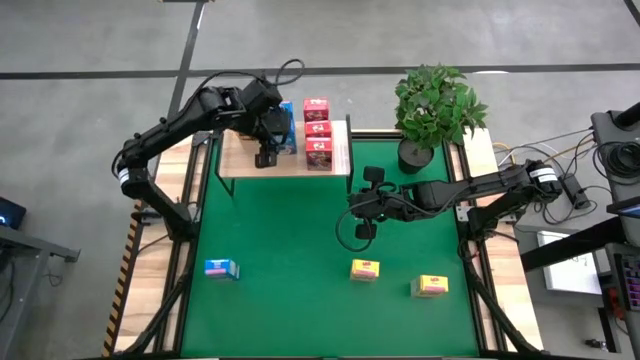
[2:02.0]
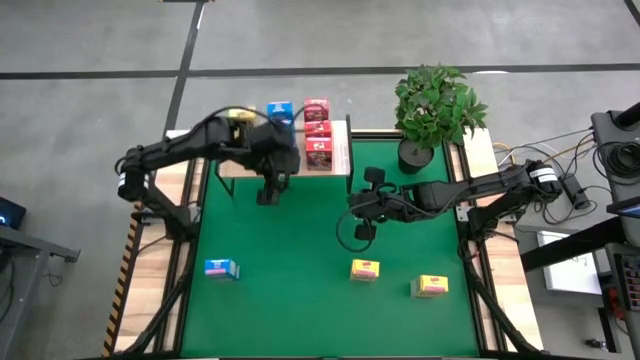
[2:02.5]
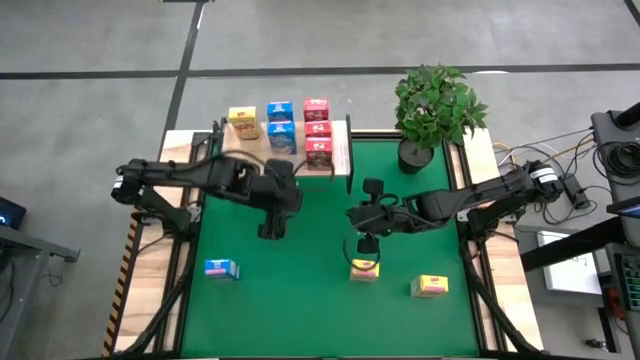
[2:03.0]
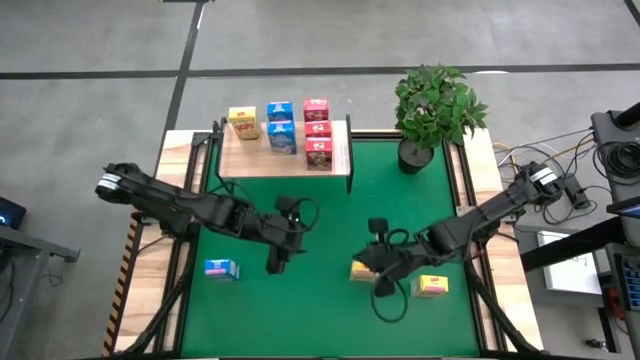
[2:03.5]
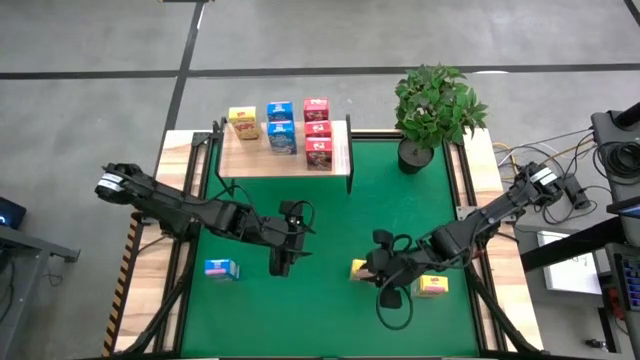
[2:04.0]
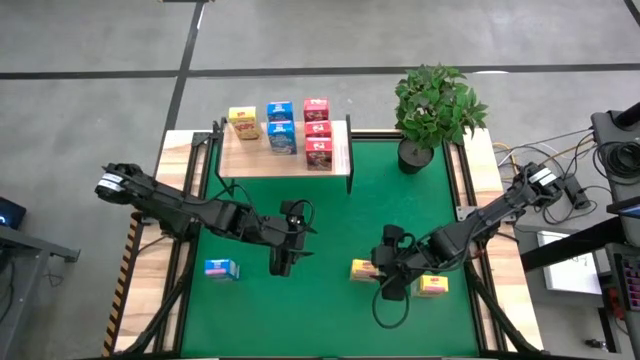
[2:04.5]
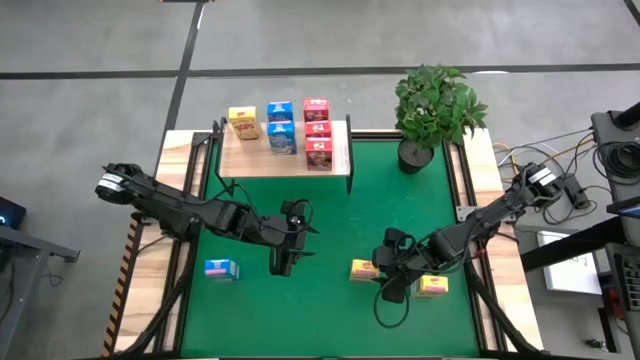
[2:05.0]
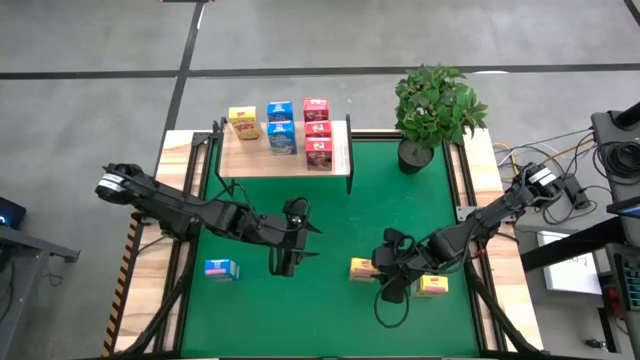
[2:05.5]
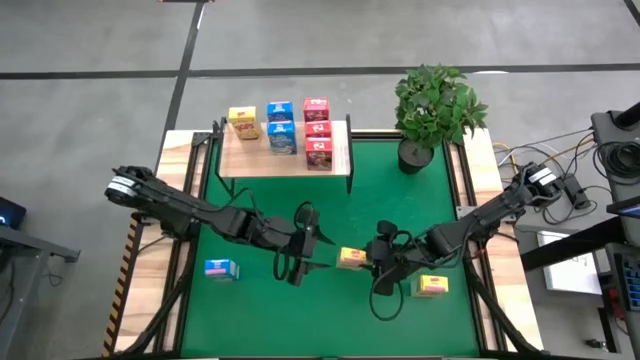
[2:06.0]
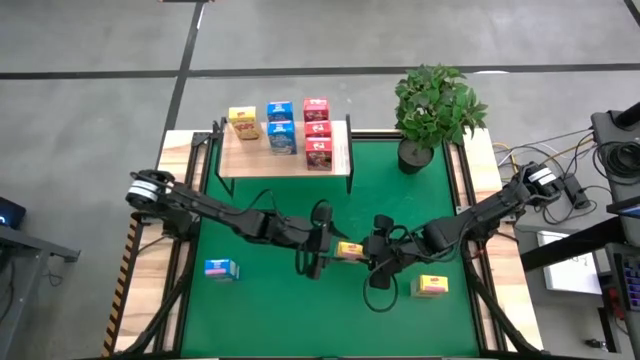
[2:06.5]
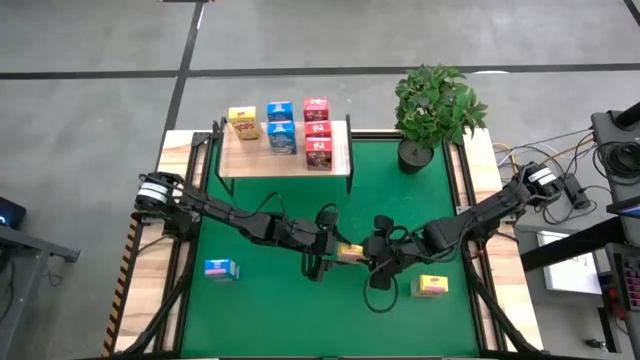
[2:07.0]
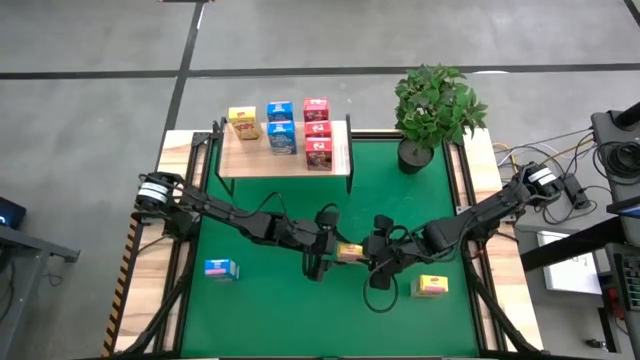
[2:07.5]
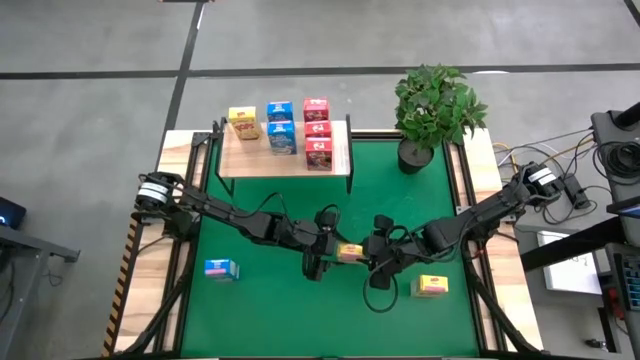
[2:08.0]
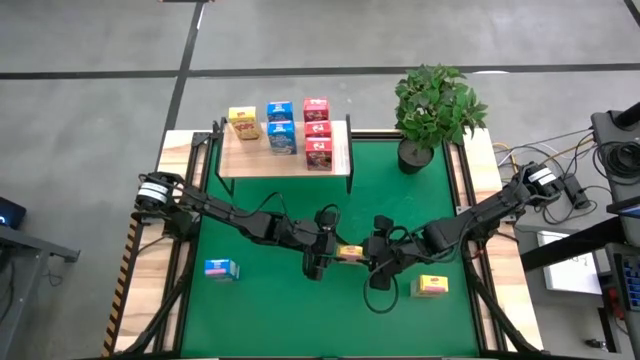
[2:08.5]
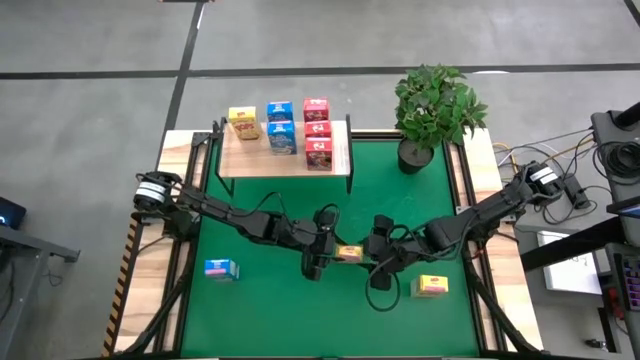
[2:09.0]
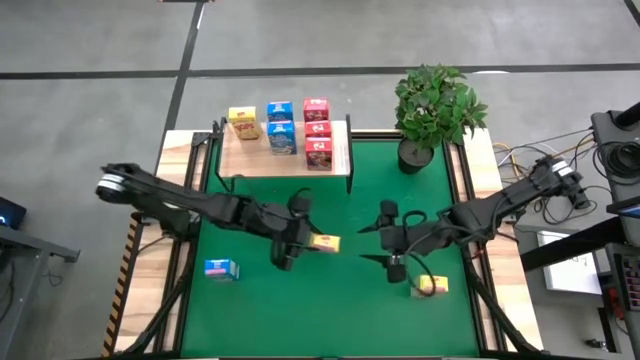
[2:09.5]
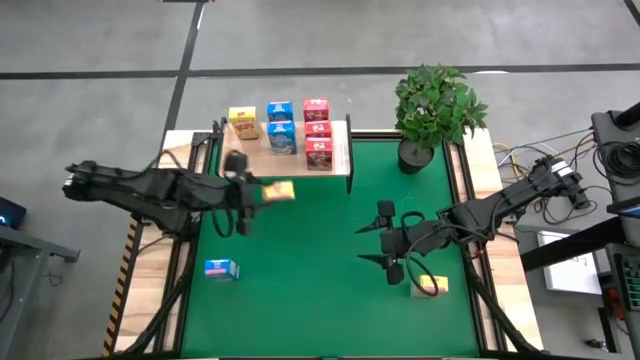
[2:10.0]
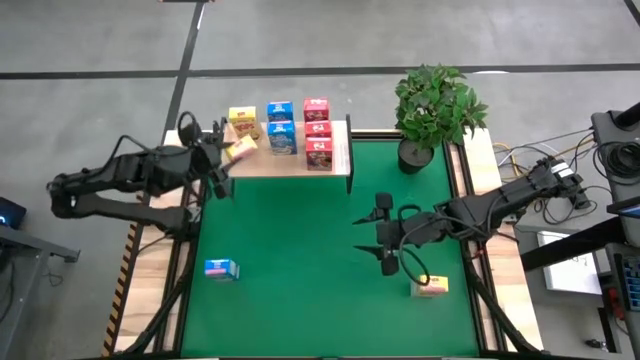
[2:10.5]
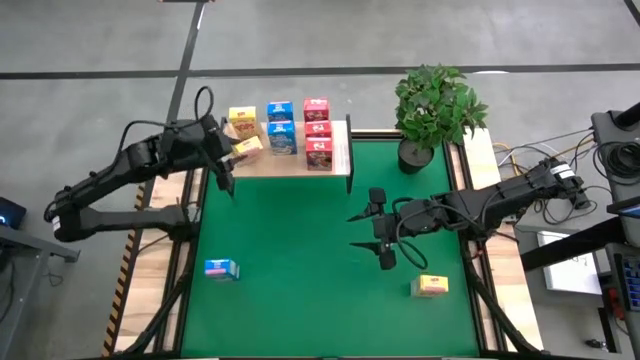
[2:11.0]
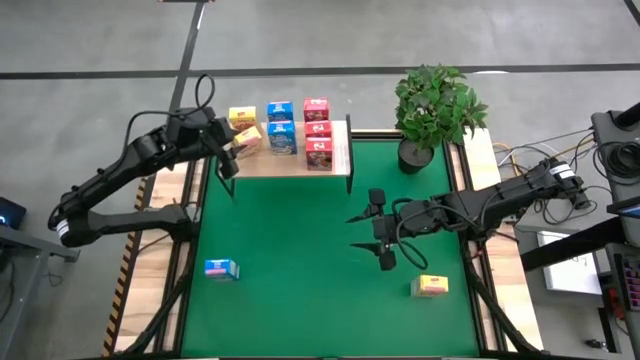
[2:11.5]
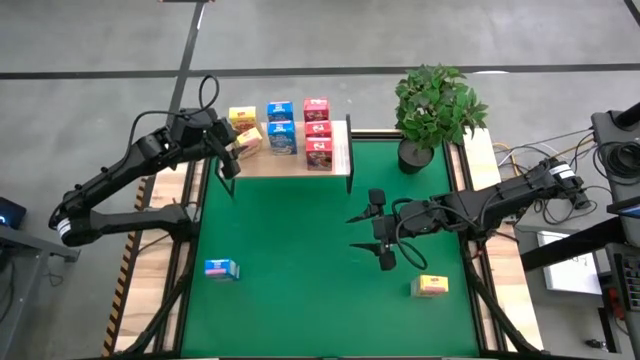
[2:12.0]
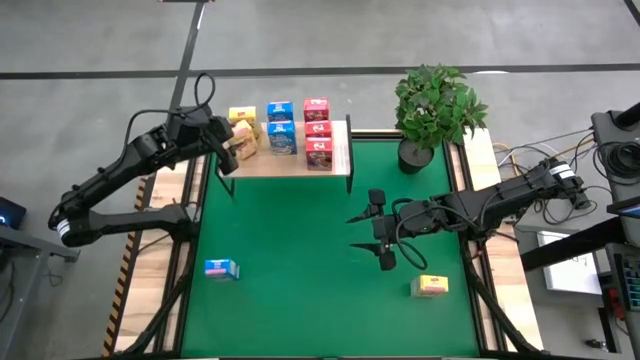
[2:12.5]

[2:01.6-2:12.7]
Task: Stack cereal on shelf
Put the center yellow cereal on the shelf

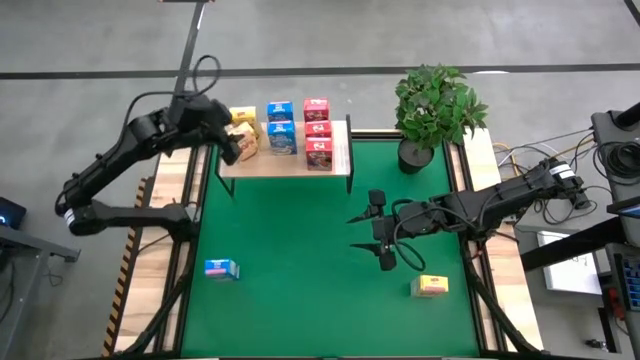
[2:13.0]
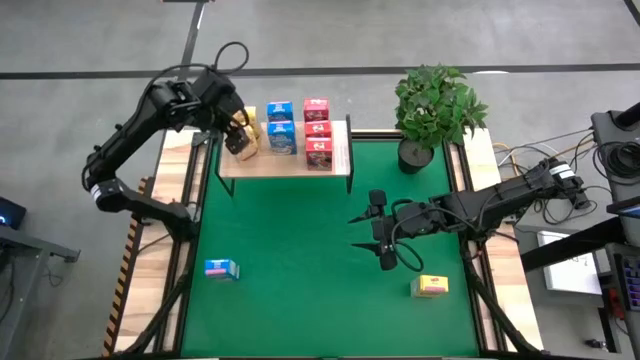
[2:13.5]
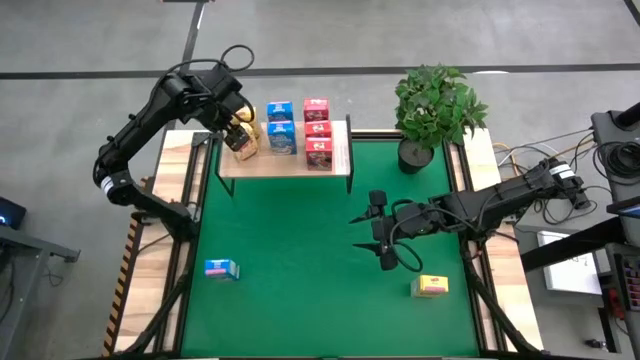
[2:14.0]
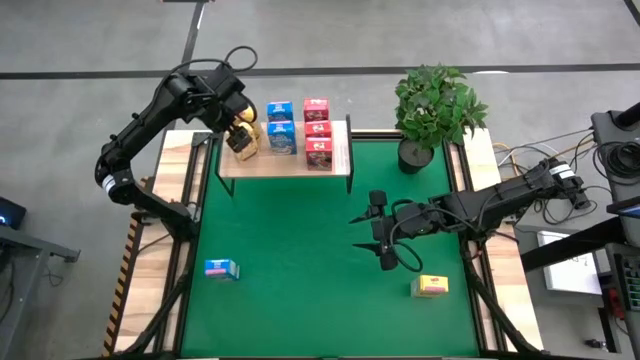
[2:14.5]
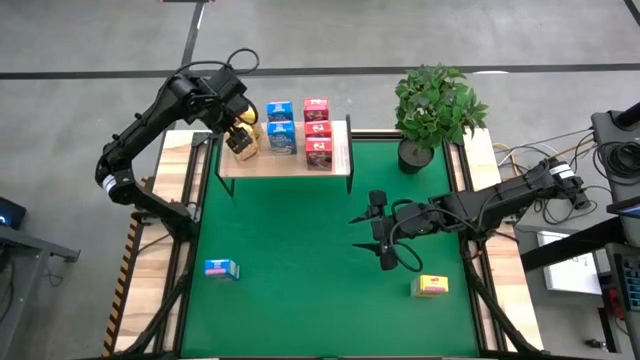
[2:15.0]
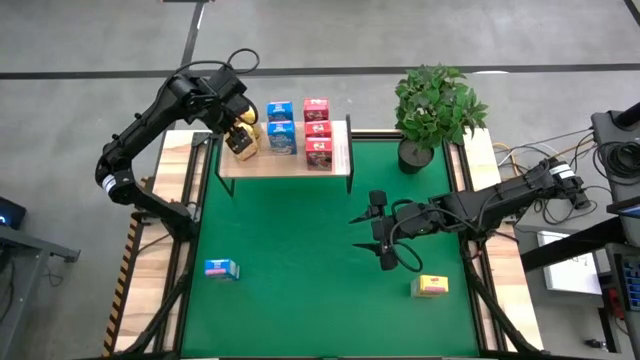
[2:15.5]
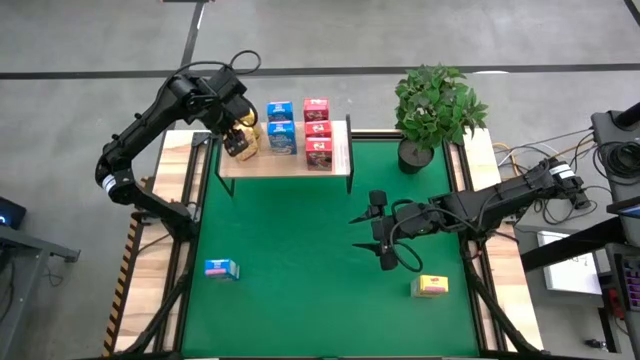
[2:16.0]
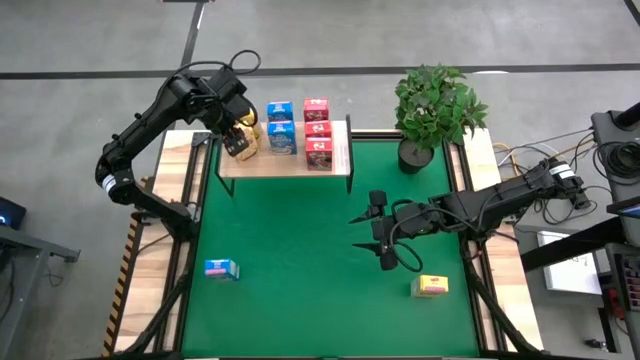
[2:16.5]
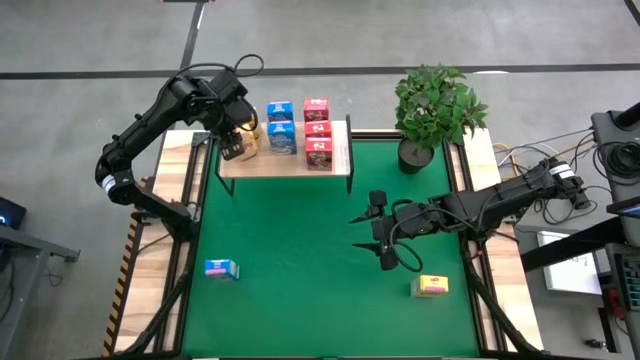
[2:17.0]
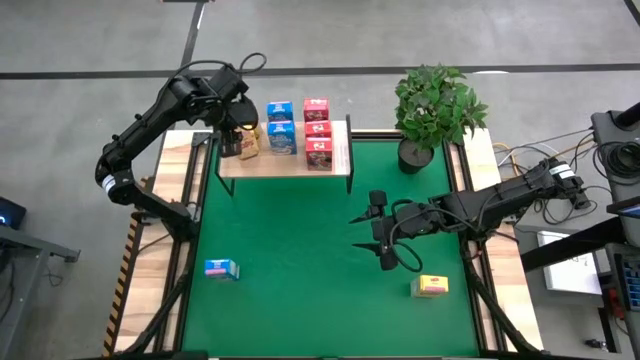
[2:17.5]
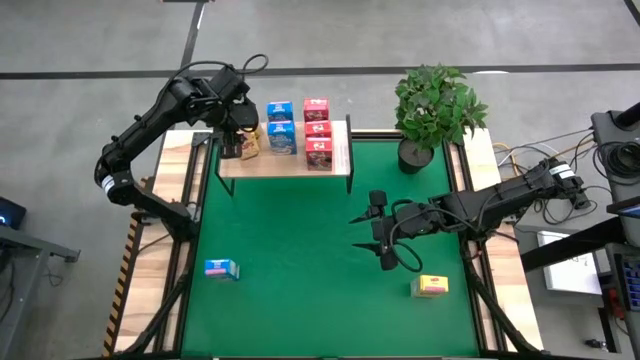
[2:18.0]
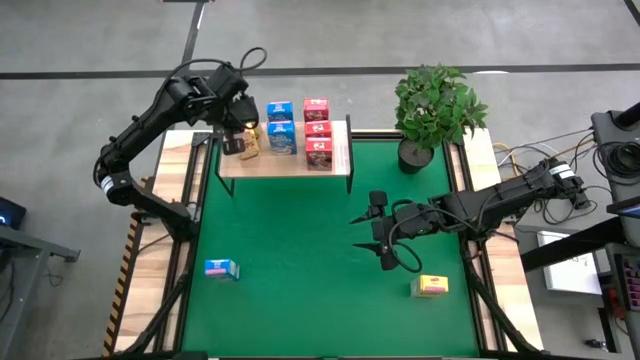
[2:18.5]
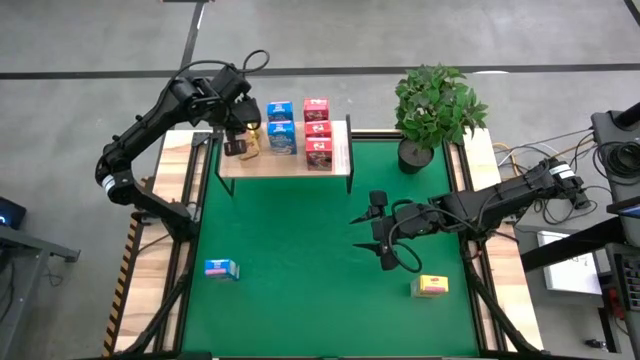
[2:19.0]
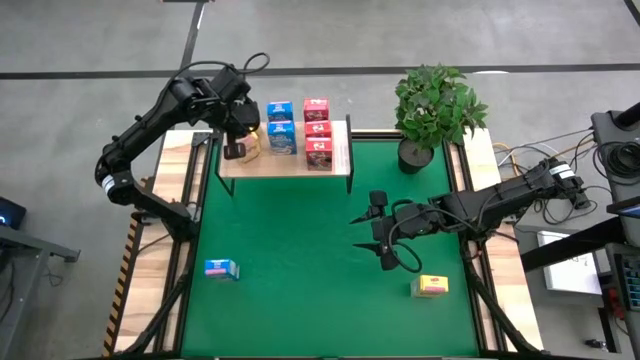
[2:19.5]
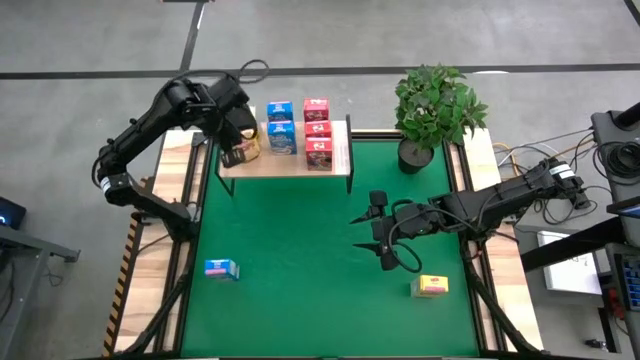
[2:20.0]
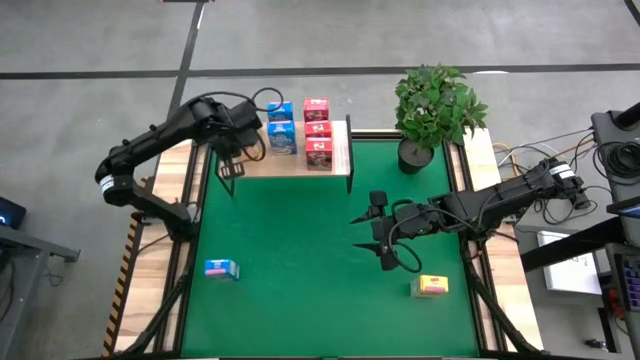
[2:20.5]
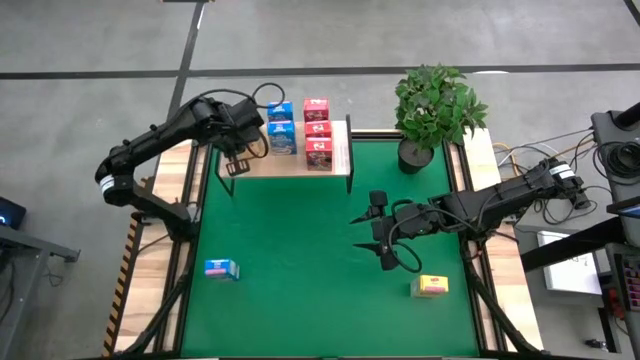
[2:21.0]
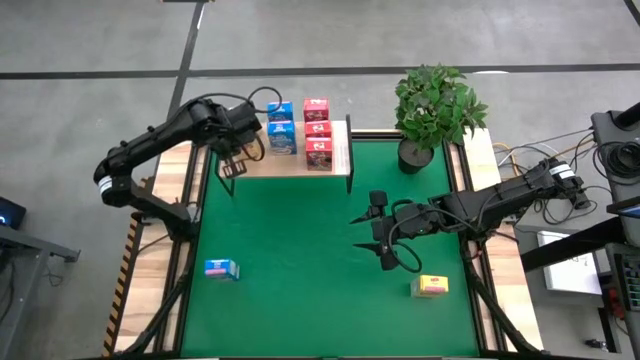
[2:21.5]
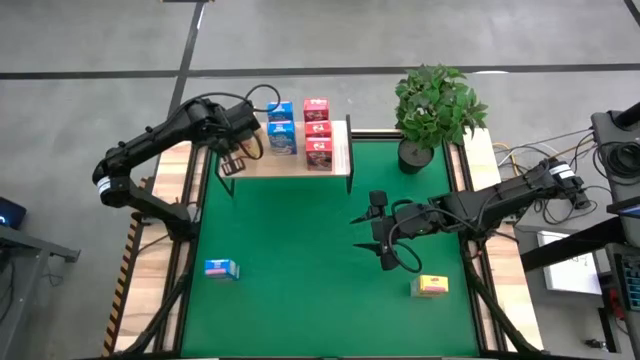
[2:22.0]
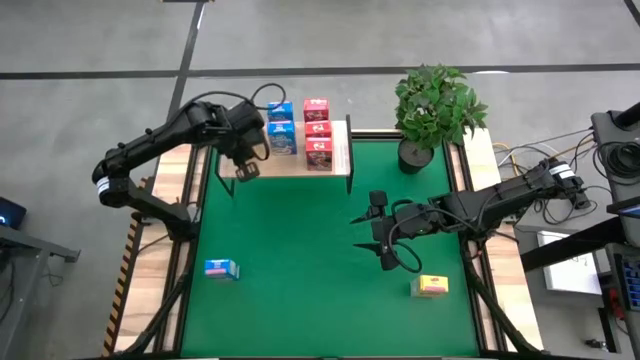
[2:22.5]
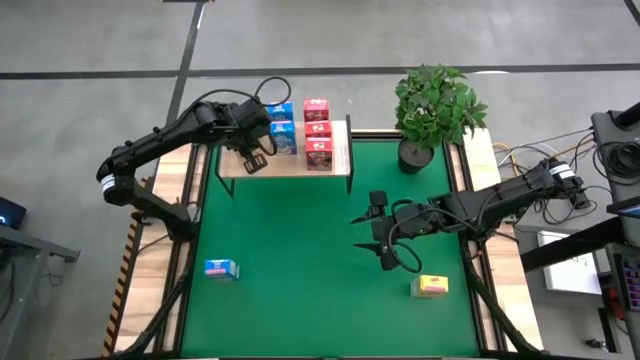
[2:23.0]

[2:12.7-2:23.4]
Adjust the yellow cereal on the shelf
